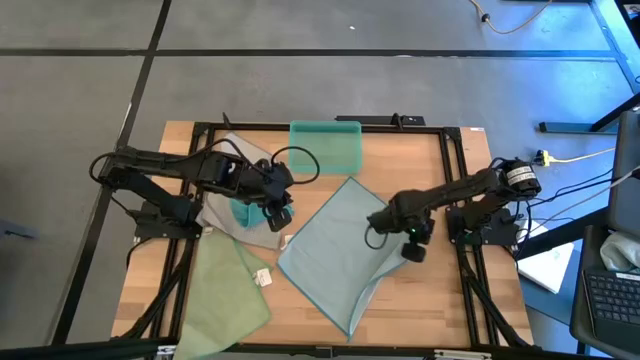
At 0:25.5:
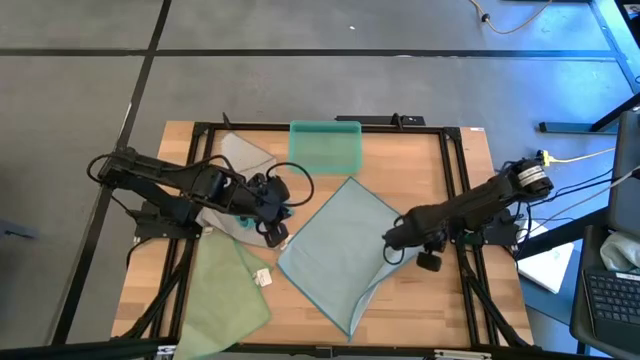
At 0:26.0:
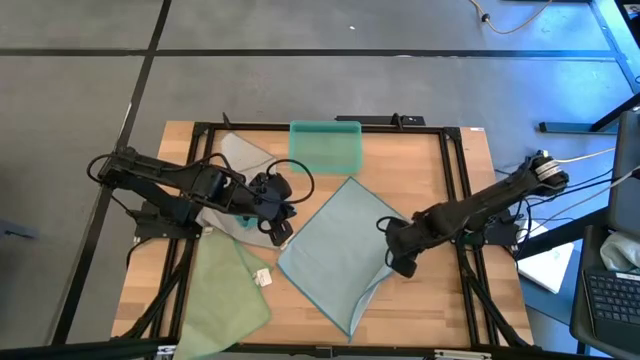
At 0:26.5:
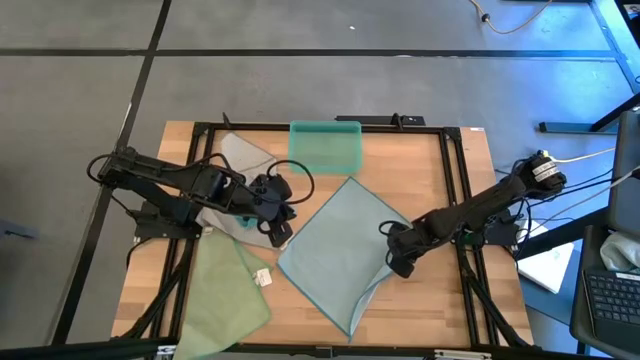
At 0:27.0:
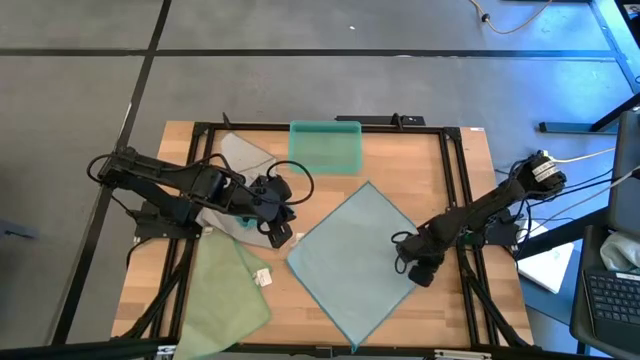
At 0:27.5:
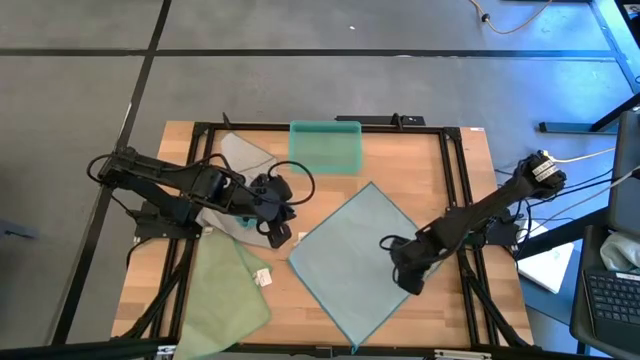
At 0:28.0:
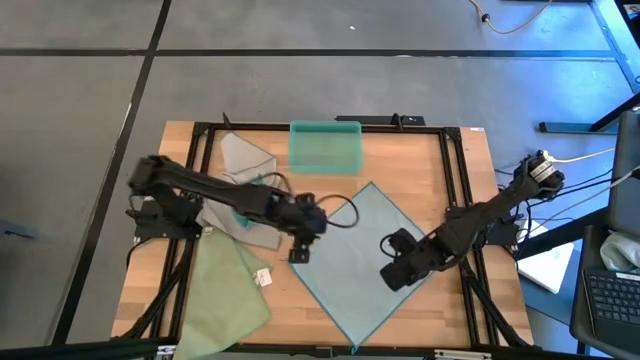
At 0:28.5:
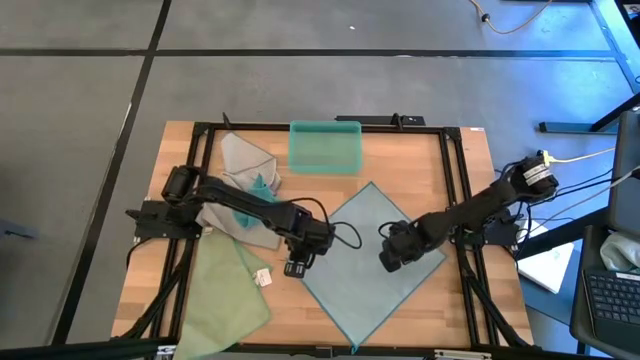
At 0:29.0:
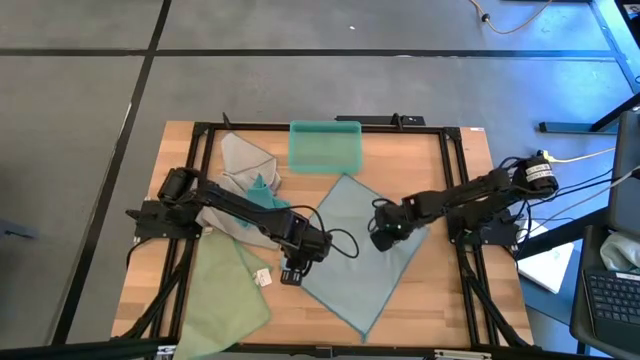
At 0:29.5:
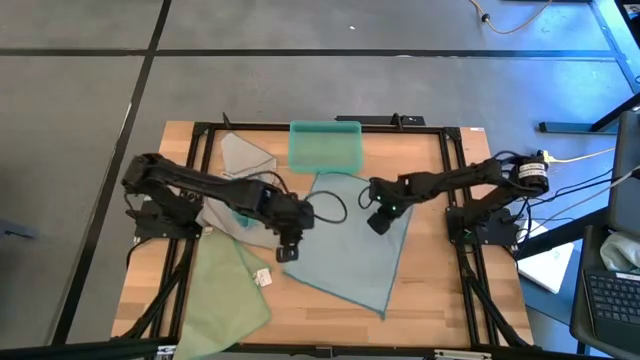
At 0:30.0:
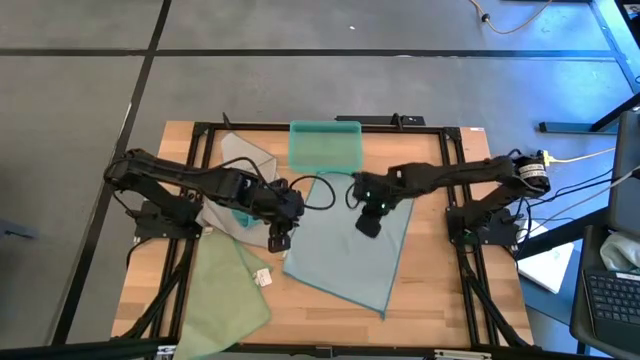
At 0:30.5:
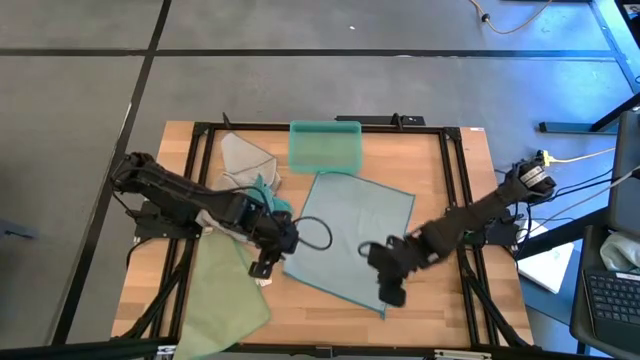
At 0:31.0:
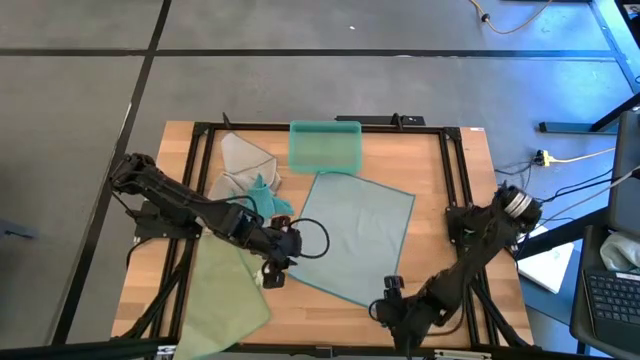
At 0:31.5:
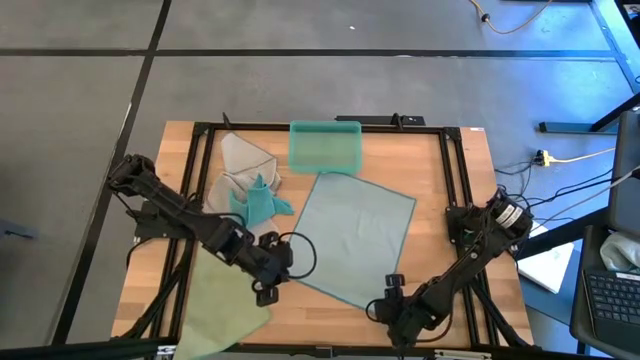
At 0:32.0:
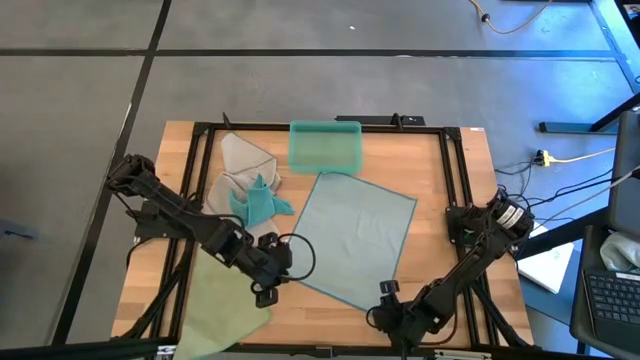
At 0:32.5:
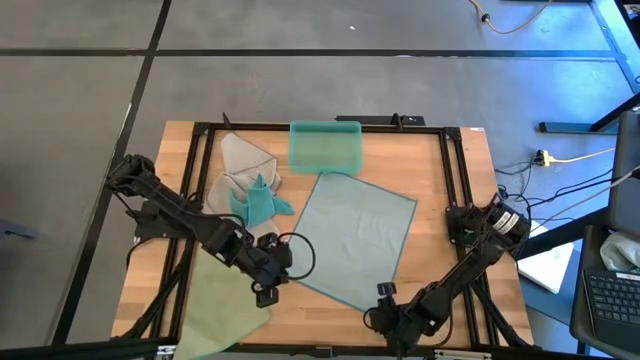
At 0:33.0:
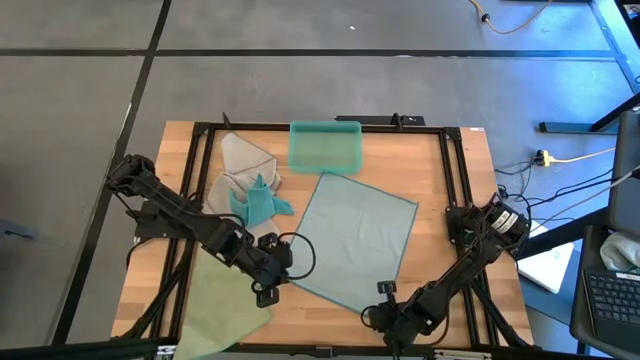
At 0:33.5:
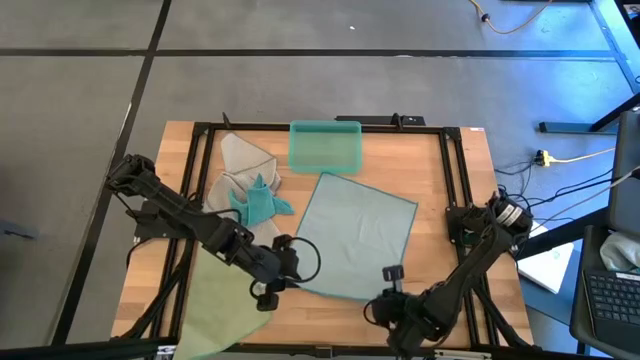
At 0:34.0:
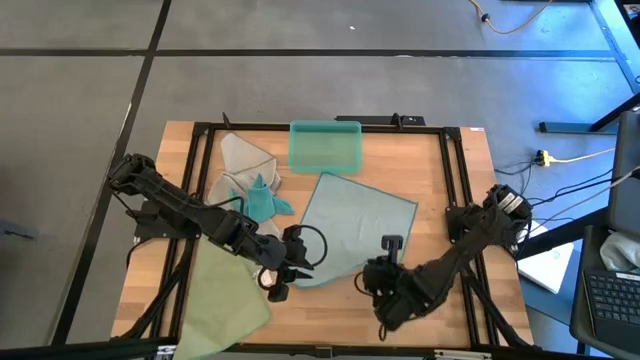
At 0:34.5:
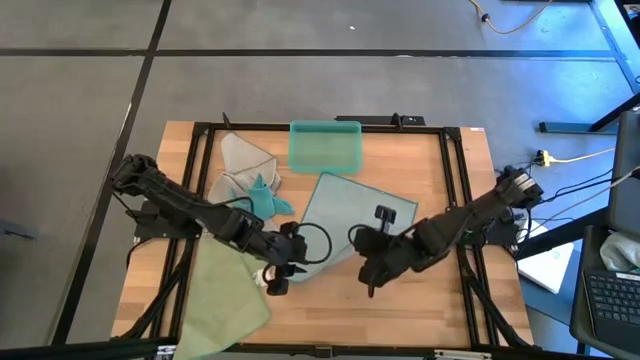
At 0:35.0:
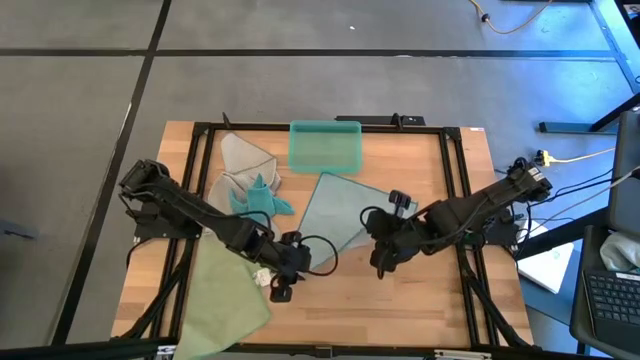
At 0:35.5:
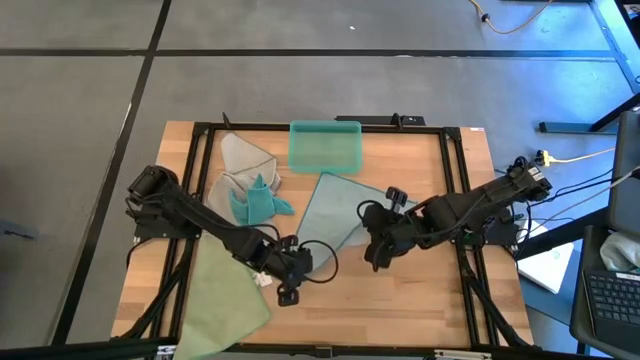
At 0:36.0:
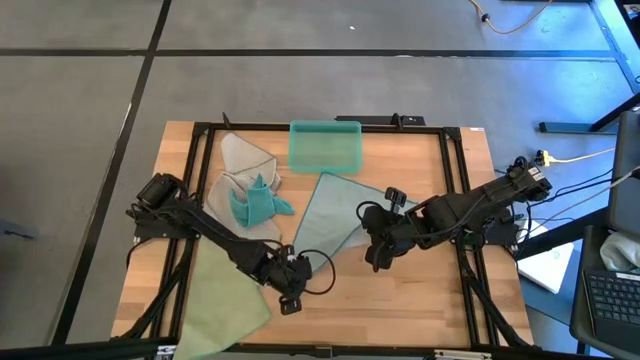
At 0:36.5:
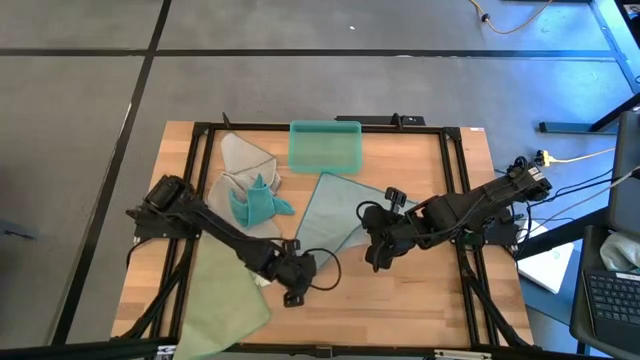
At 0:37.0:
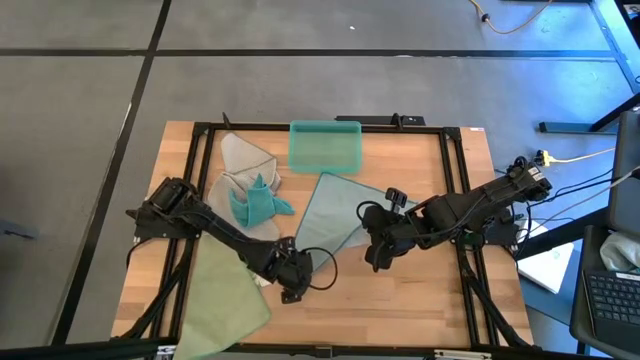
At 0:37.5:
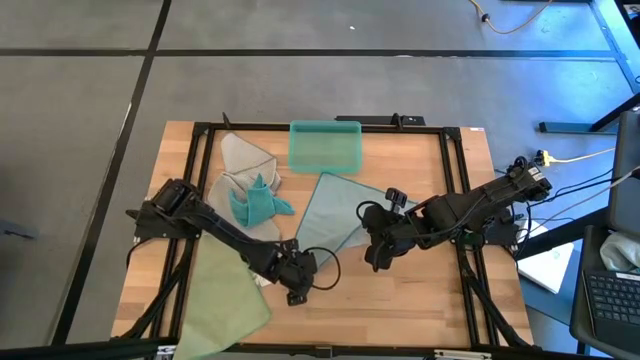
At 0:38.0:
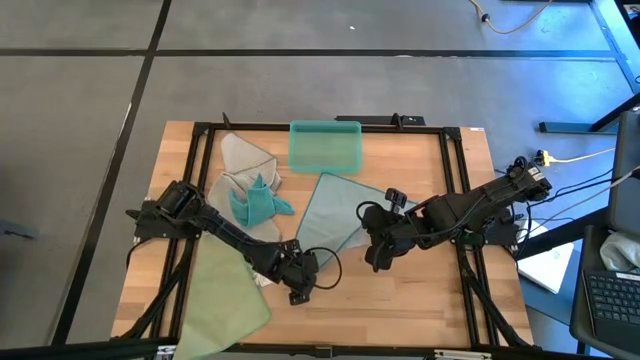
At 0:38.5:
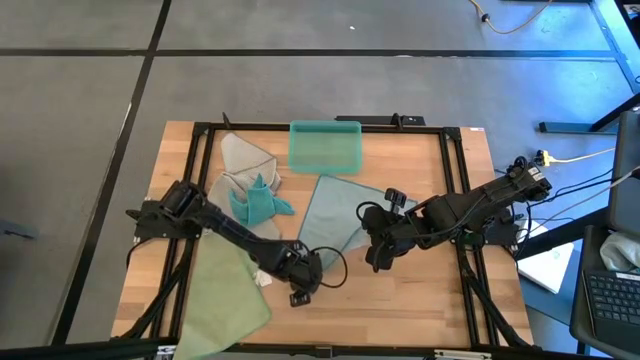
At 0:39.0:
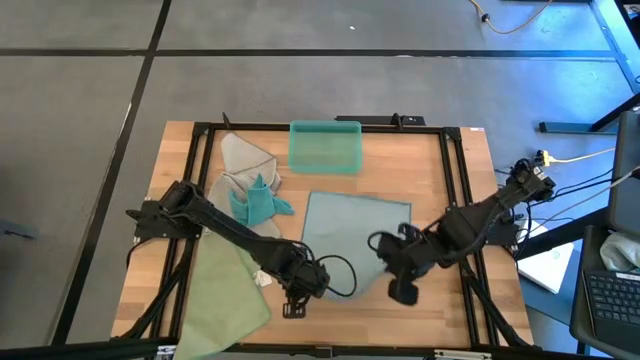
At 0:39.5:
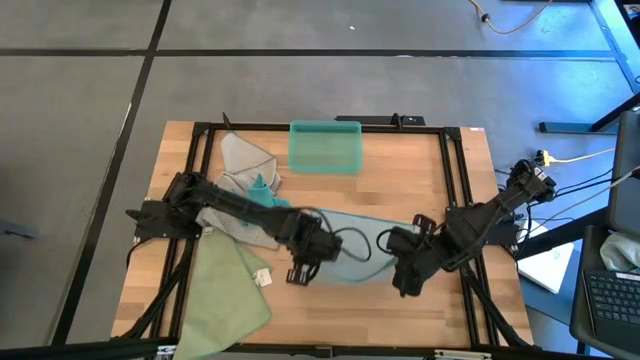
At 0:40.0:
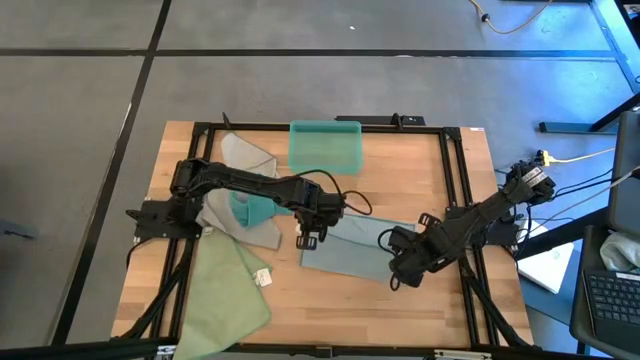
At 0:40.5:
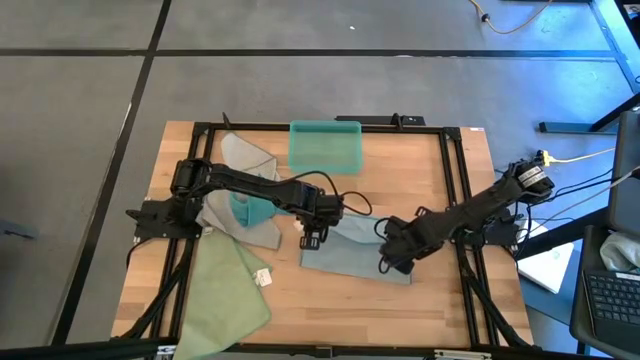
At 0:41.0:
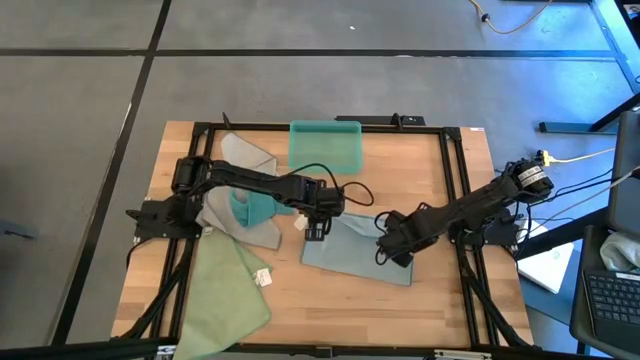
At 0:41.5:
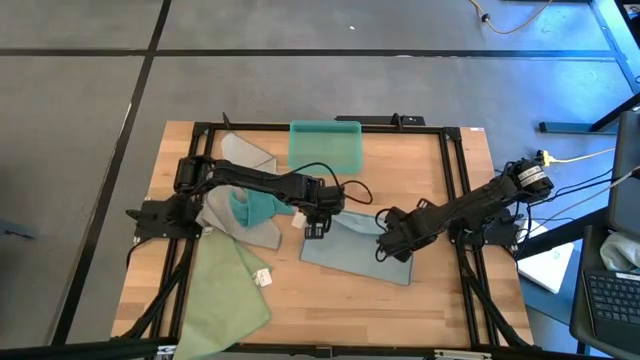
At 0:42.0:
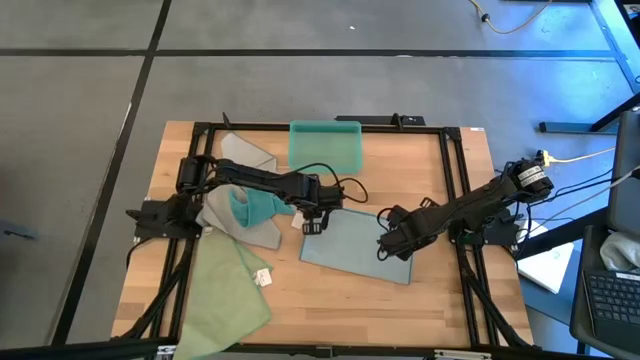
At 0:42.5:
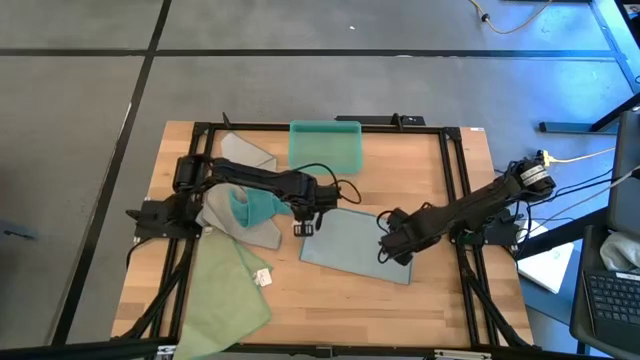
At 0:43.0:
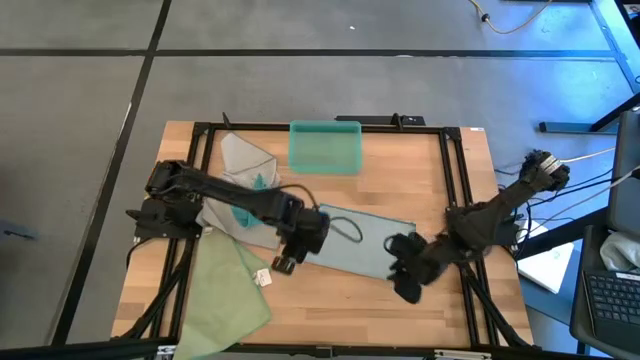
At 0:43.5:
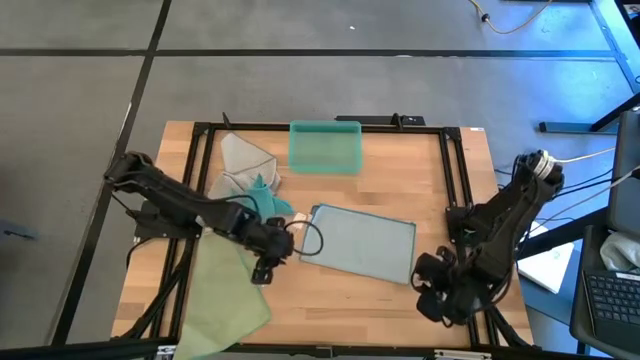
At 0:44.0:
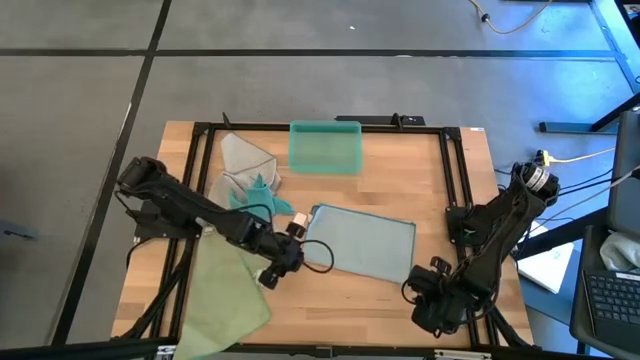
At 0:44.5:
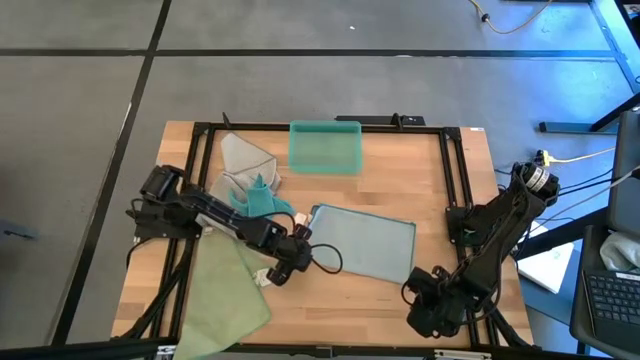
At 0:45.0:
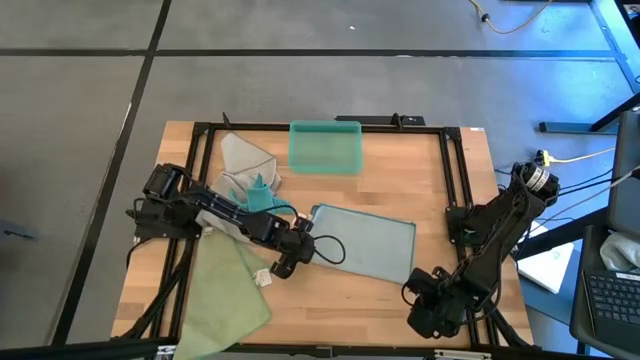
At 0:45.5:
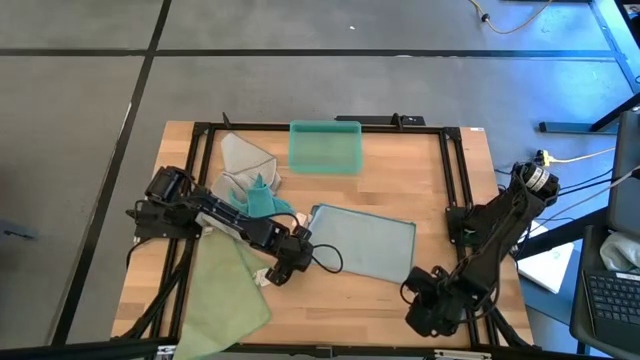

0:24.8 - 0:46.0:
Task: Fold microfiber towels
Fold the light blue towel
